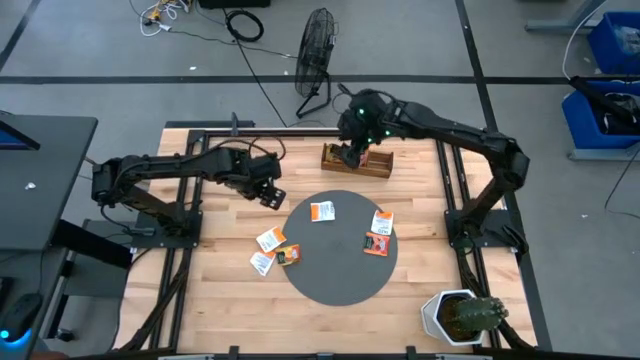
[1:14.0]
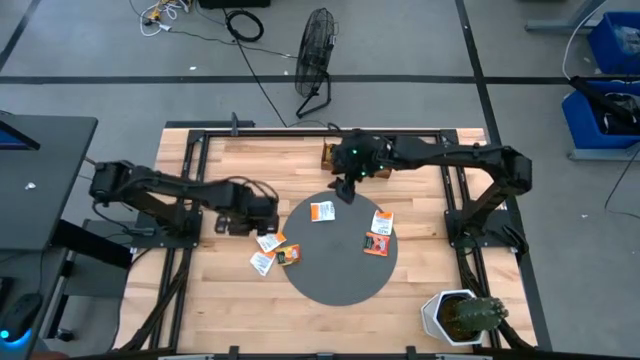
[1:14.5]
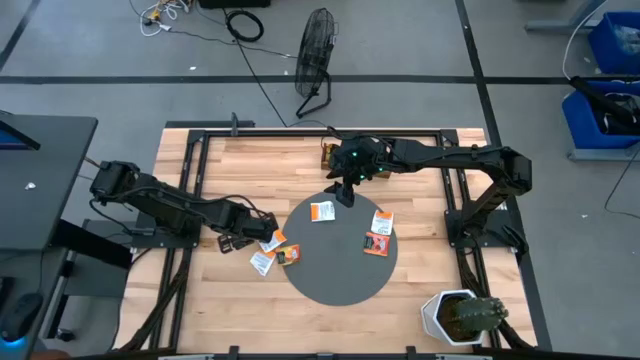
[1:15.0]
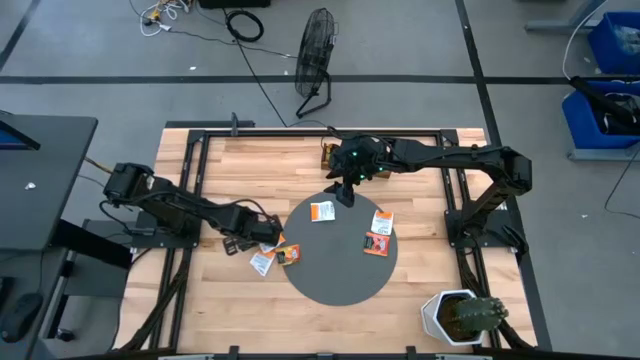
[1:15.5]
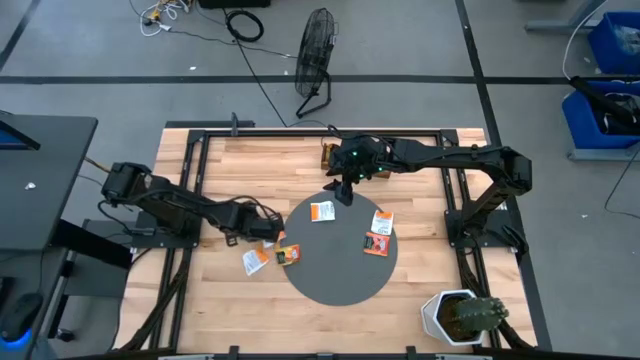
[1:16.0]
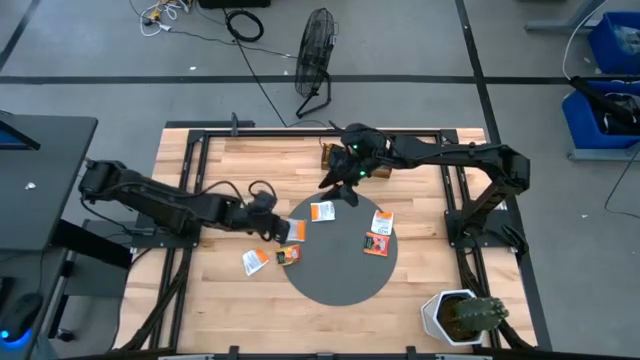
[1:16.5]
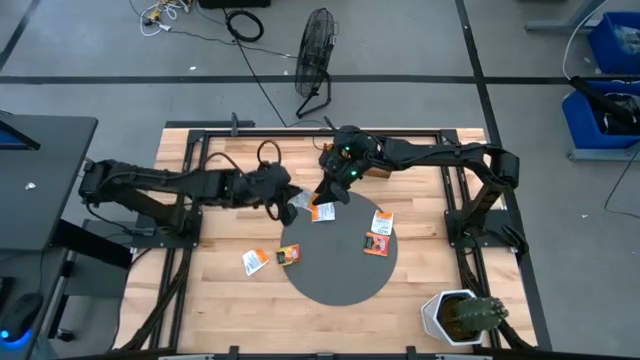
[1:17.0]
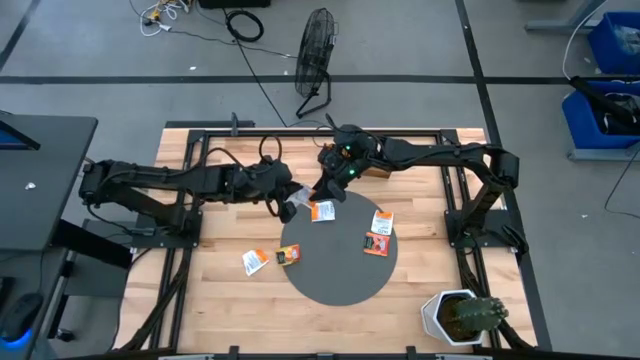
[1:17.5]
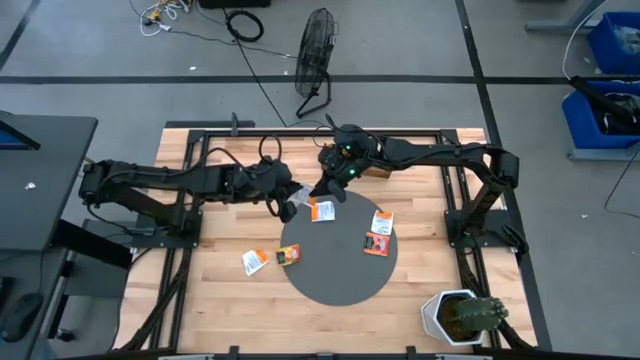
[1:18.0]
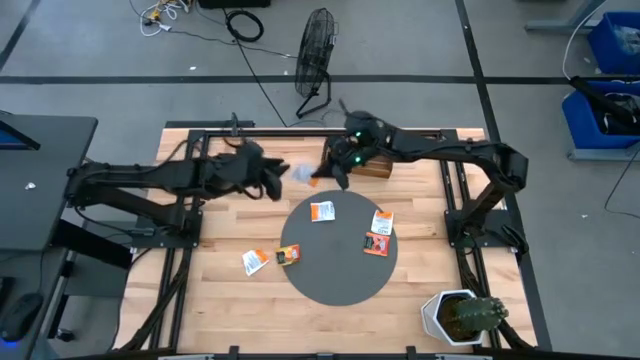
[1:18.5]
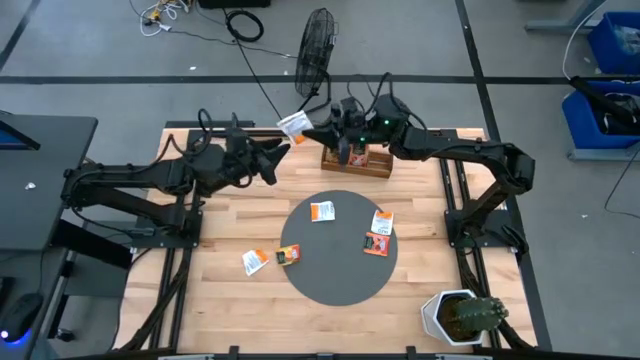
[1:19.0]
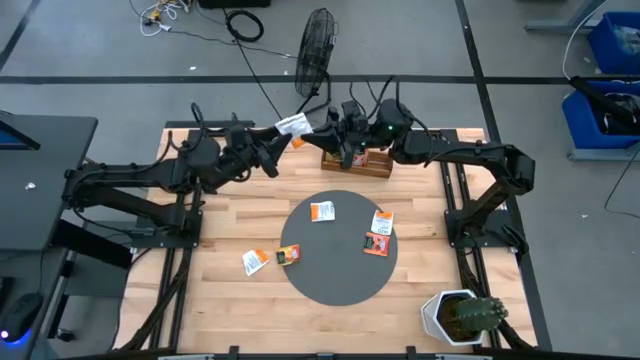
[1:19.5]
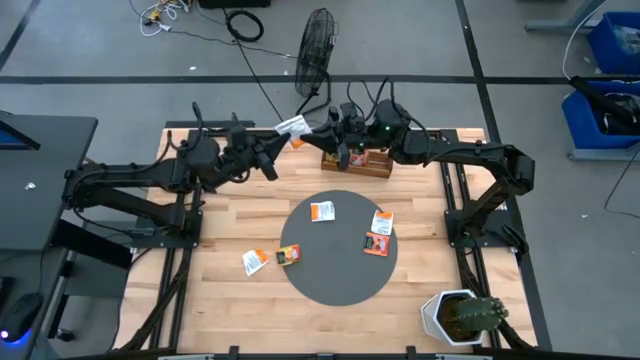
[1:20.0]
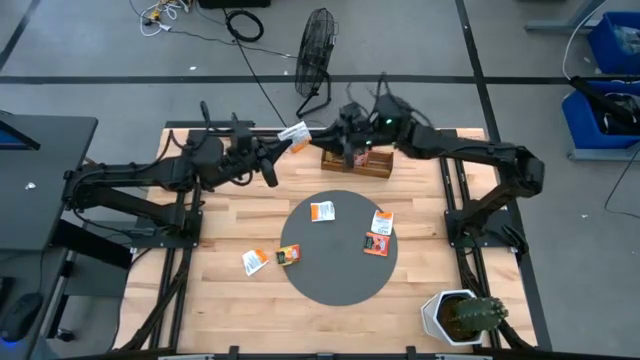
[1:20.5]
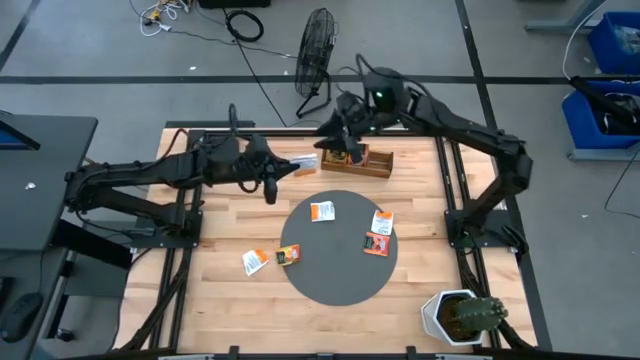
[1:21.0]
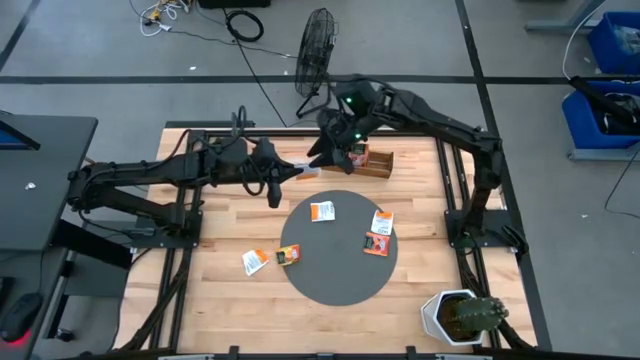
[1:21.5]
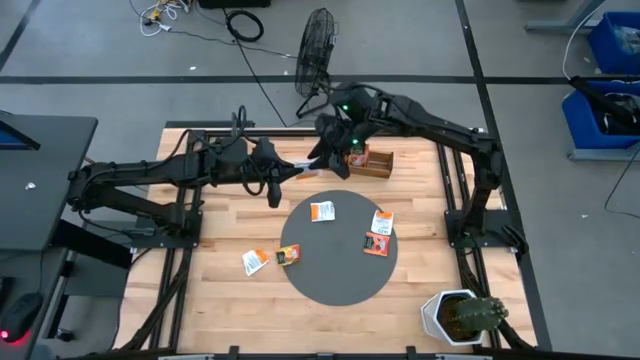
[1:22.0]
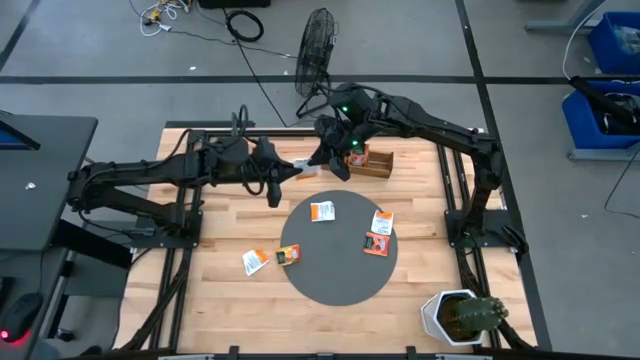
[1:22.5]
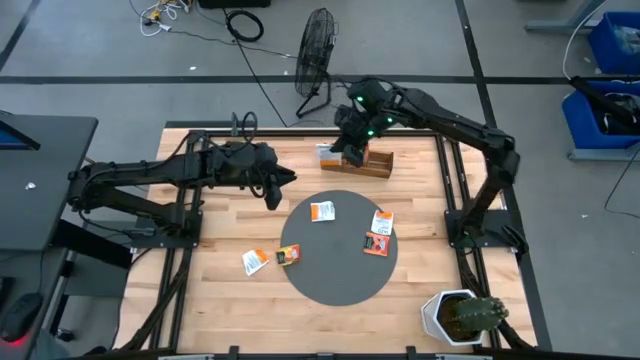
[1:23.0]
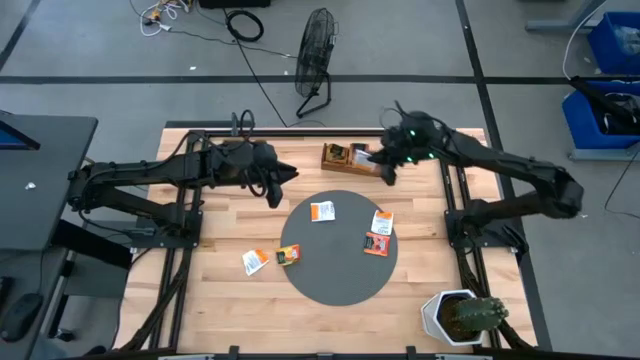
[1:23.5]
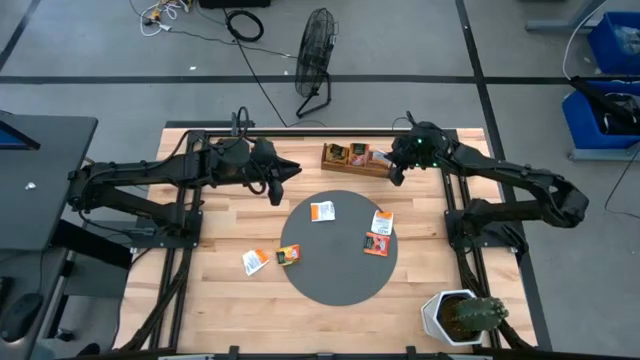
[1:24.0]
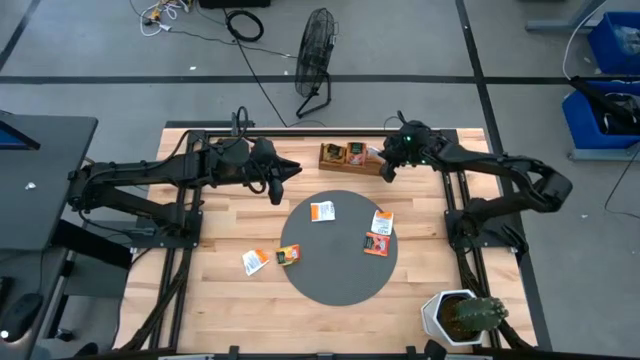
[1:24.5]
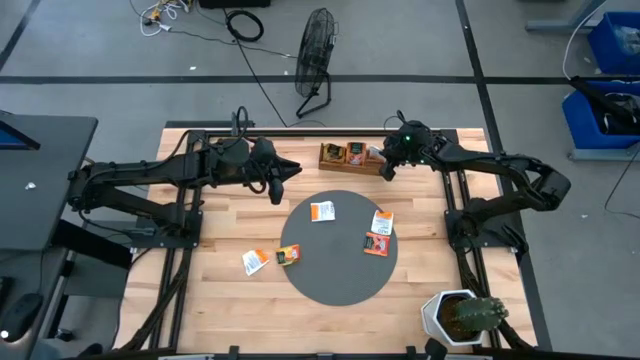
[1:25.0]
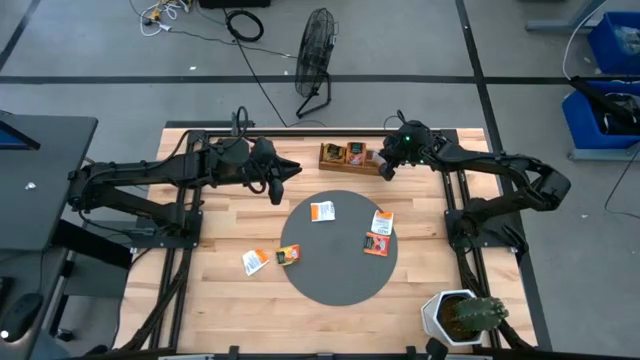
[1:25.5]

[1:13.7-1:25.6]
Task: Pick & Place Tea
Put the white tea bag into the right section of the wooden organizer

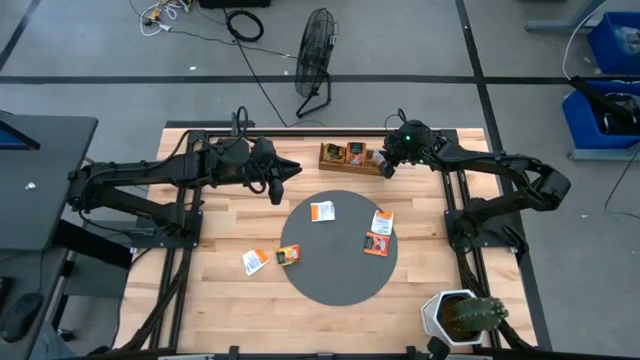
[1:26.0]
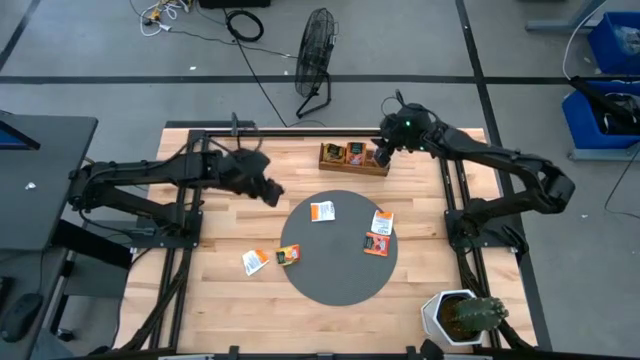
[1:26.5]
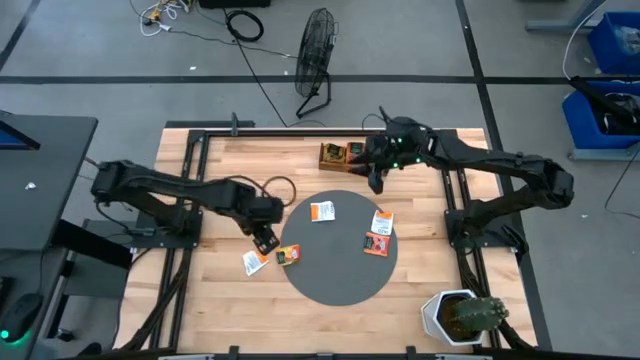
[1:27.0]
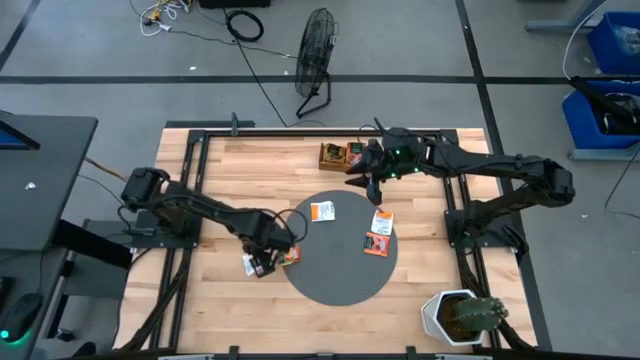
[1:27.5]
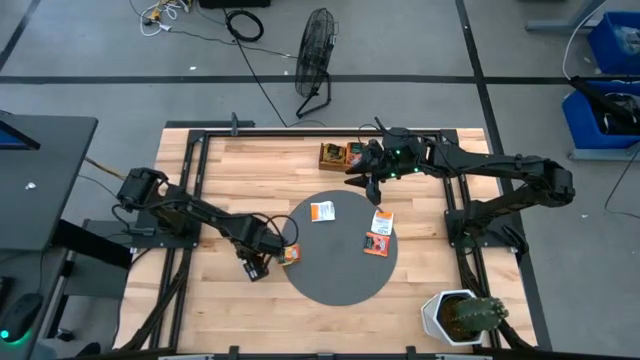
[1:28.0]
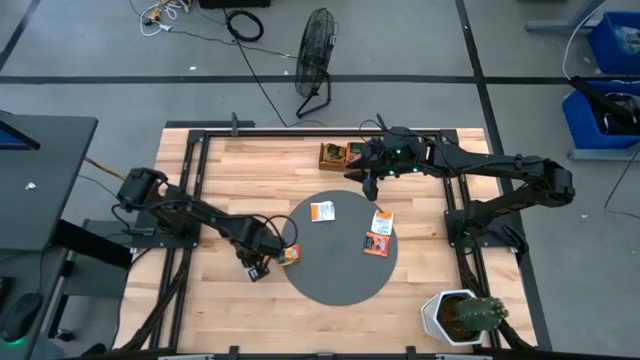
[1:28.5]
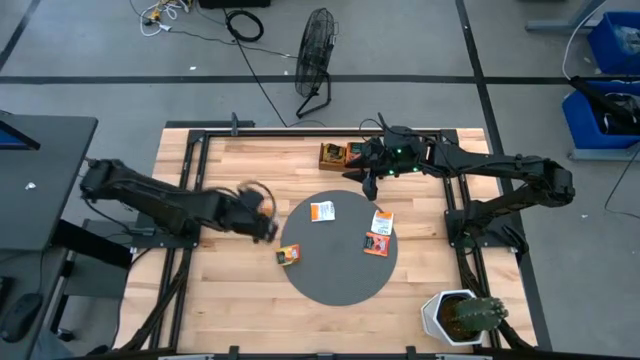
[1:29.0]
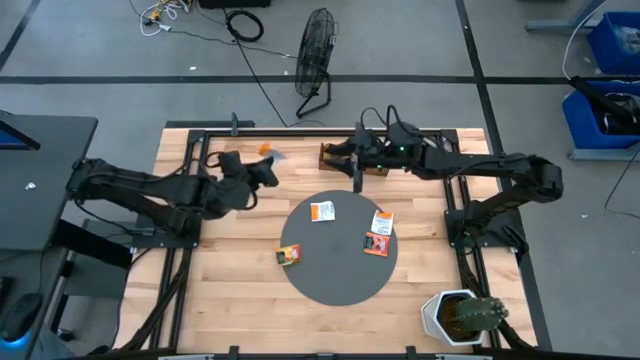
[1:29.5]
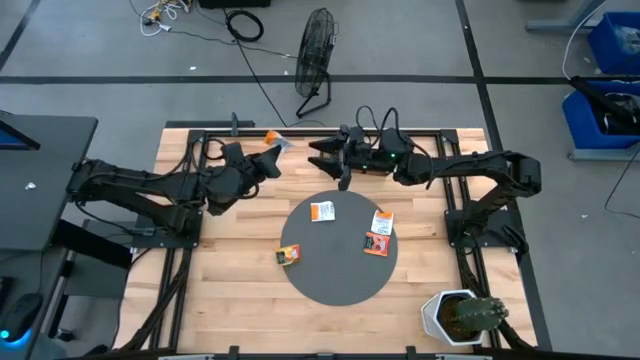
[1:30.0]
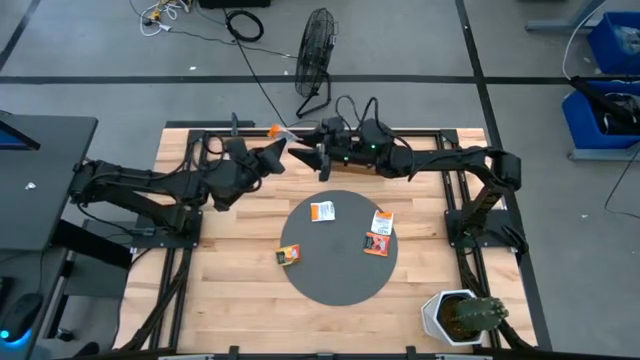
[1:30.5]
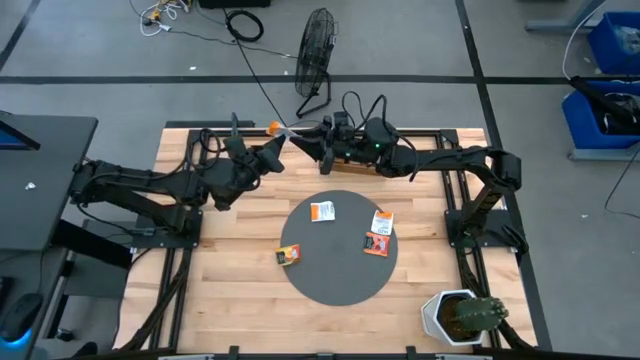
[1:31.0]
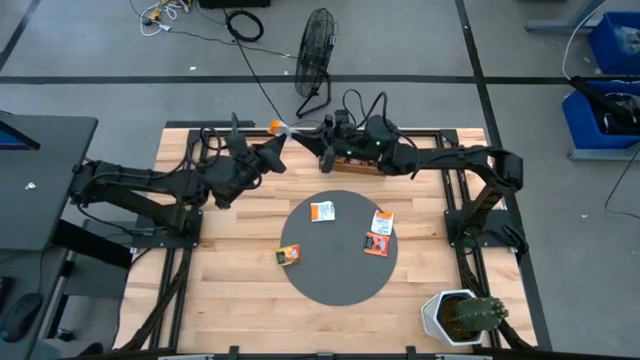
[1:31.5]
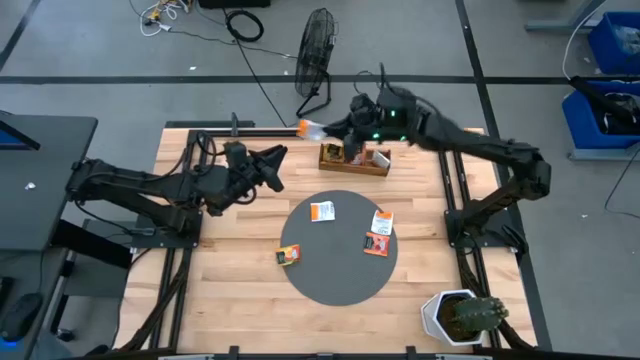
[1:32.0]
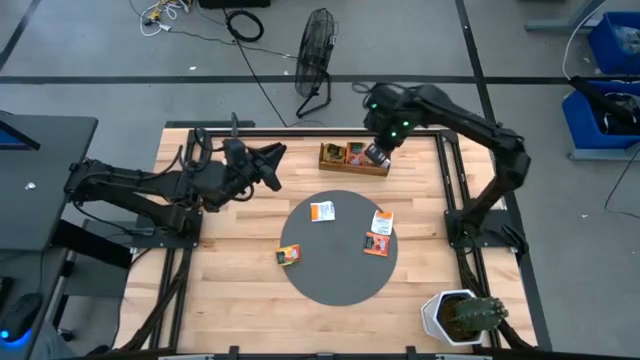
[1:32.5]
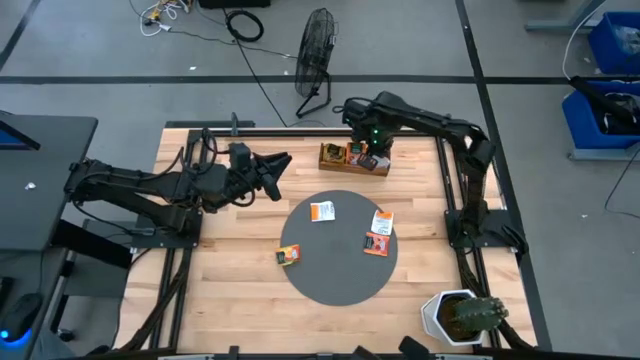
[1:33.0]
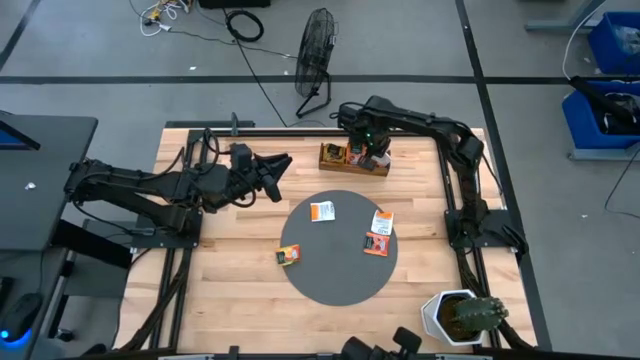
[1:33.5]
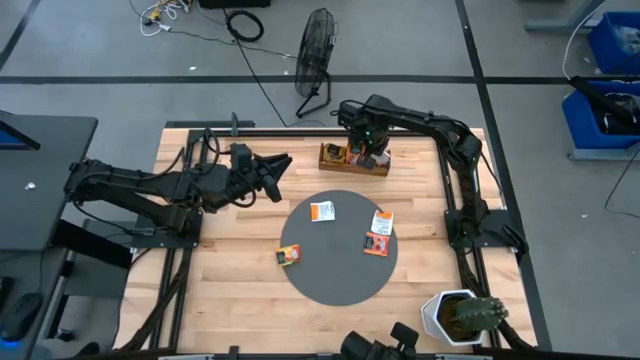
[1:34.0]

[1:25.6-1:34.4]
Put the white tea bag into the right section of the wooden organizer
